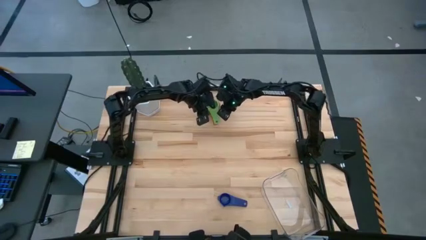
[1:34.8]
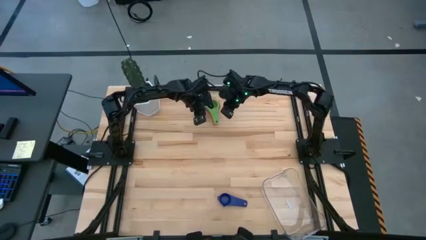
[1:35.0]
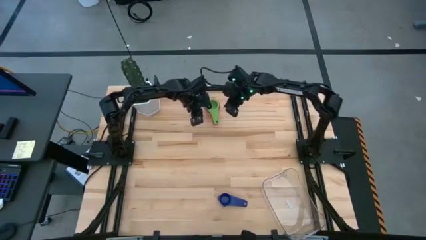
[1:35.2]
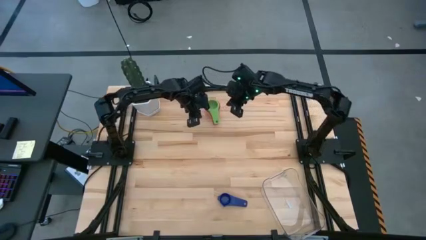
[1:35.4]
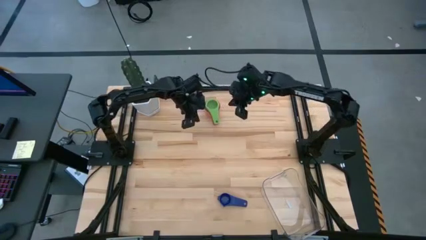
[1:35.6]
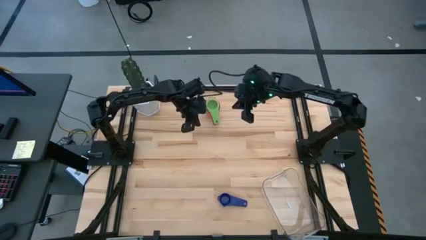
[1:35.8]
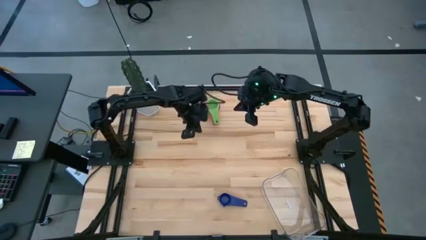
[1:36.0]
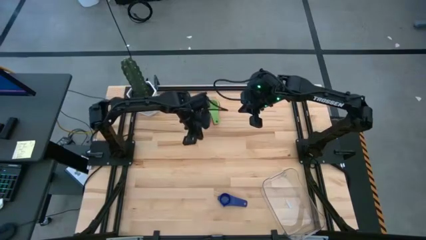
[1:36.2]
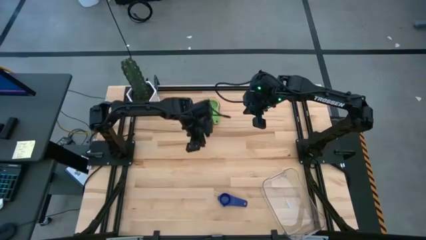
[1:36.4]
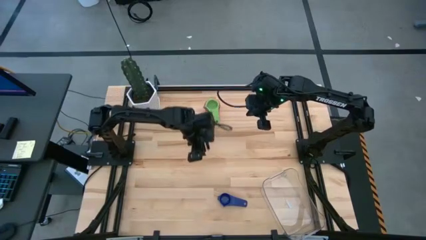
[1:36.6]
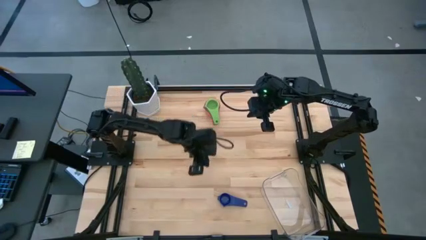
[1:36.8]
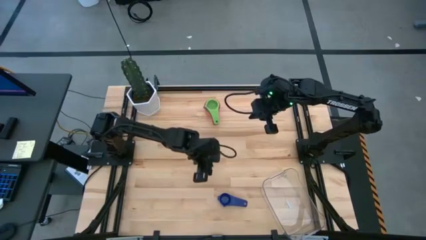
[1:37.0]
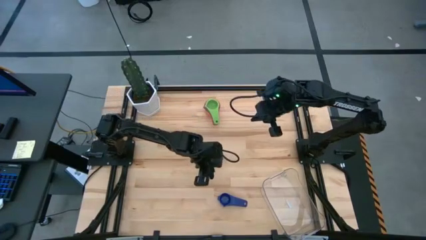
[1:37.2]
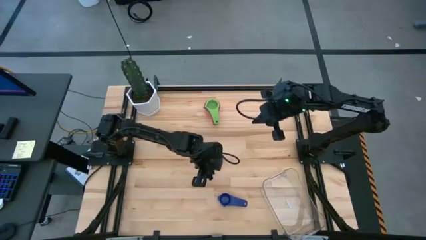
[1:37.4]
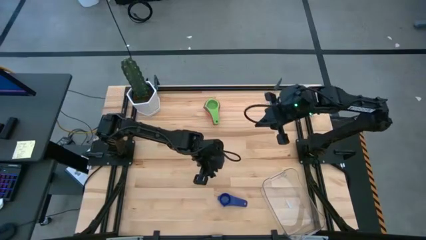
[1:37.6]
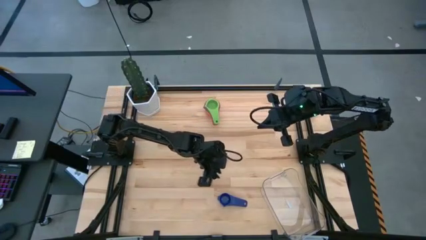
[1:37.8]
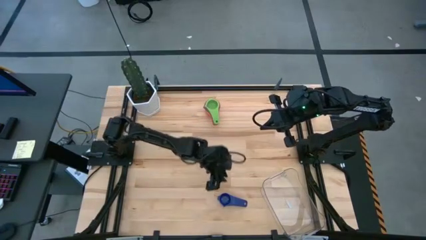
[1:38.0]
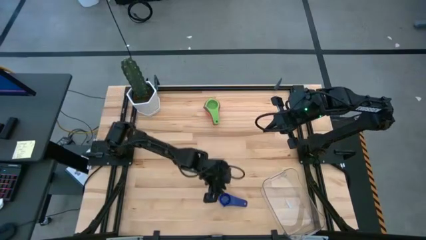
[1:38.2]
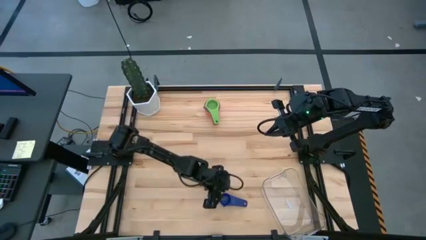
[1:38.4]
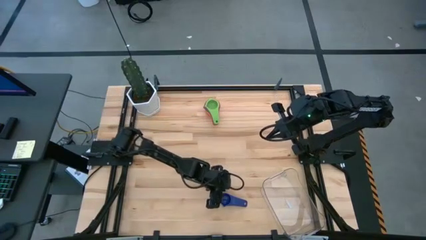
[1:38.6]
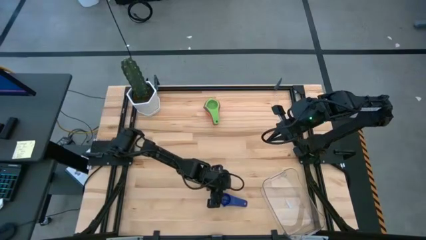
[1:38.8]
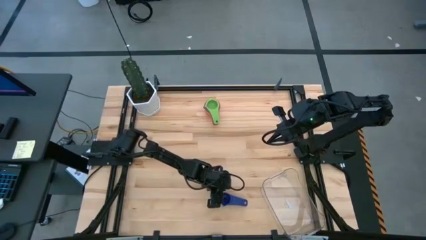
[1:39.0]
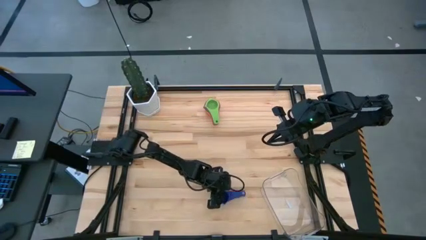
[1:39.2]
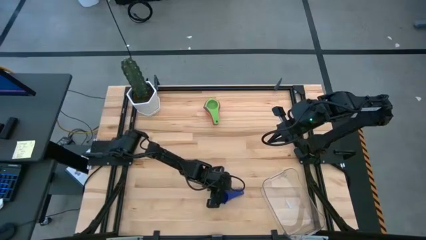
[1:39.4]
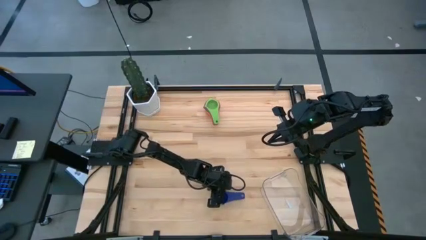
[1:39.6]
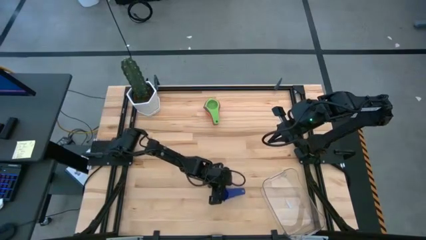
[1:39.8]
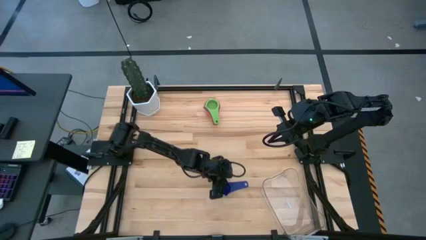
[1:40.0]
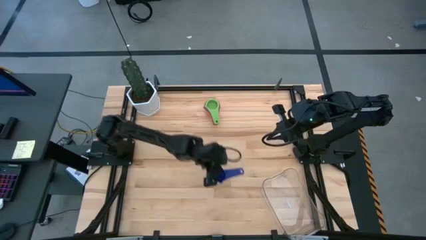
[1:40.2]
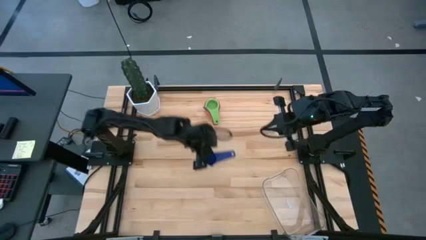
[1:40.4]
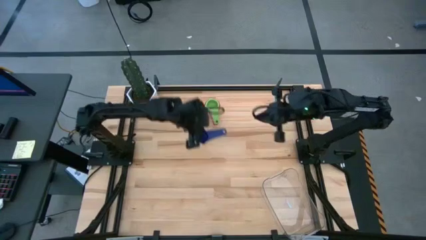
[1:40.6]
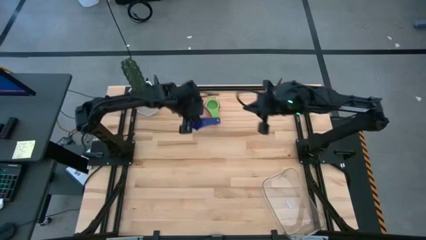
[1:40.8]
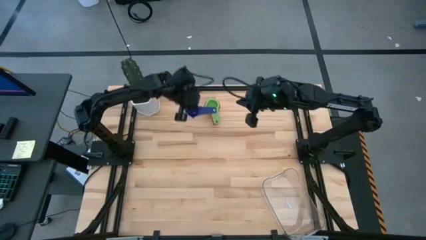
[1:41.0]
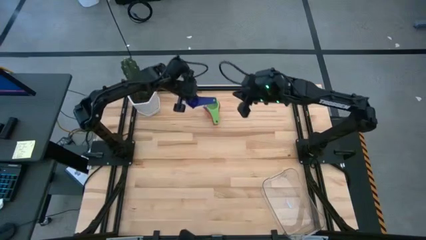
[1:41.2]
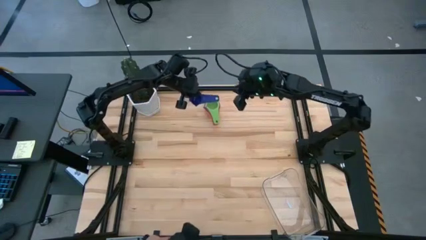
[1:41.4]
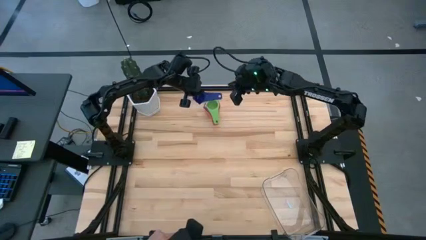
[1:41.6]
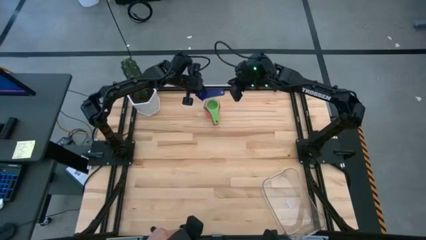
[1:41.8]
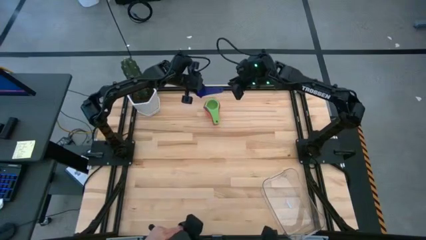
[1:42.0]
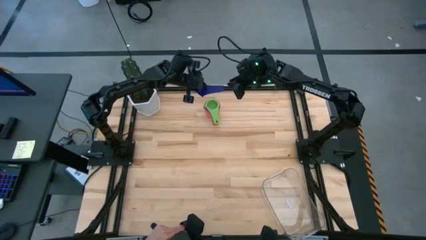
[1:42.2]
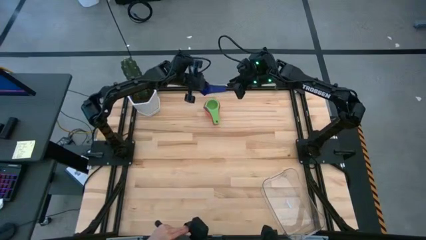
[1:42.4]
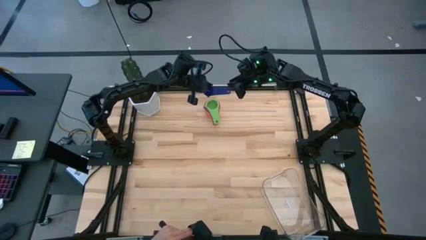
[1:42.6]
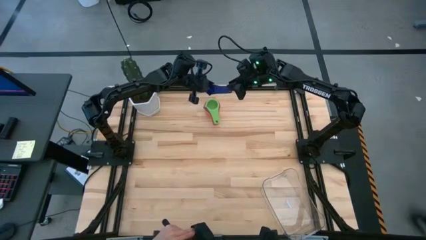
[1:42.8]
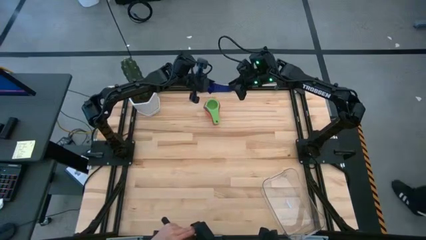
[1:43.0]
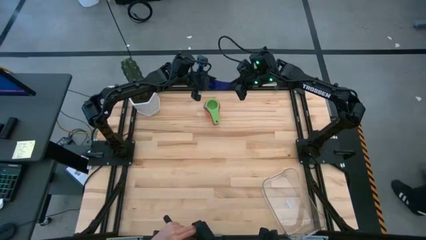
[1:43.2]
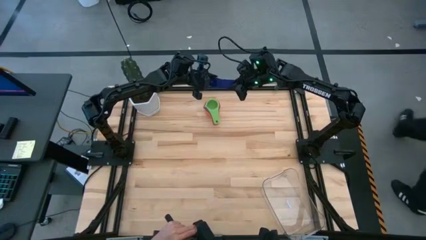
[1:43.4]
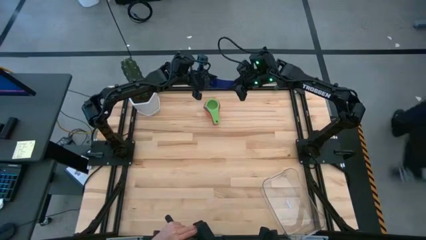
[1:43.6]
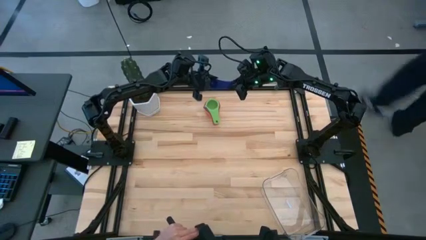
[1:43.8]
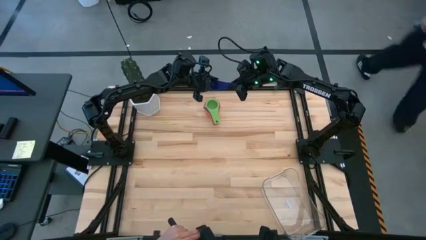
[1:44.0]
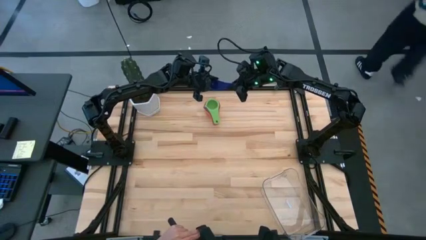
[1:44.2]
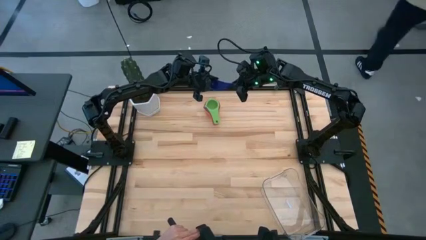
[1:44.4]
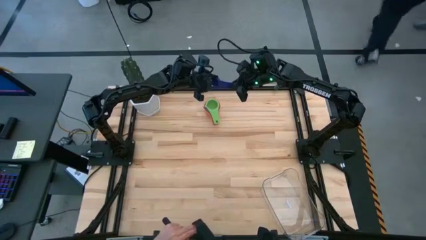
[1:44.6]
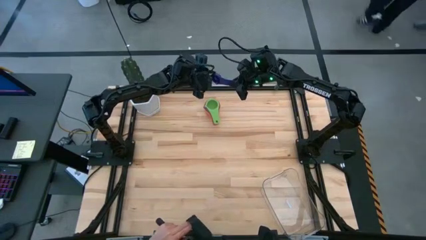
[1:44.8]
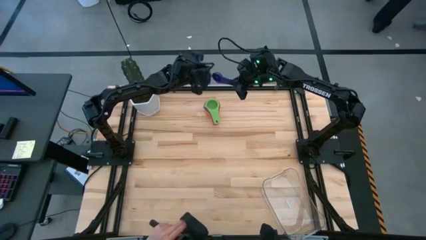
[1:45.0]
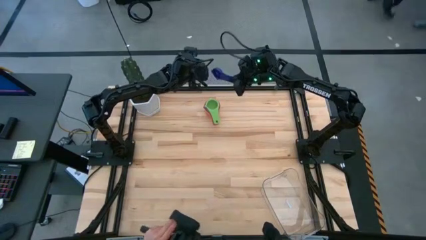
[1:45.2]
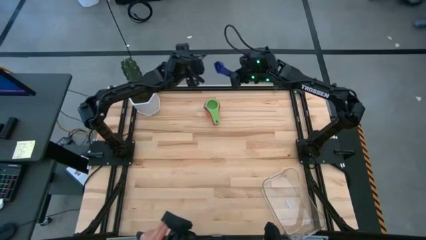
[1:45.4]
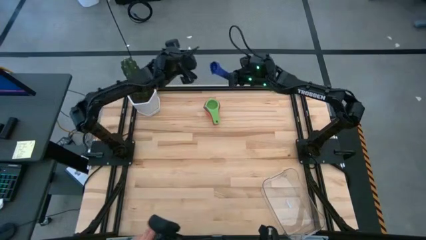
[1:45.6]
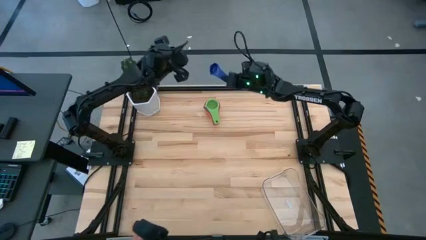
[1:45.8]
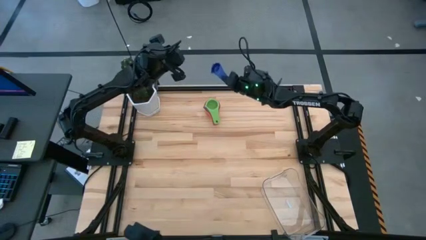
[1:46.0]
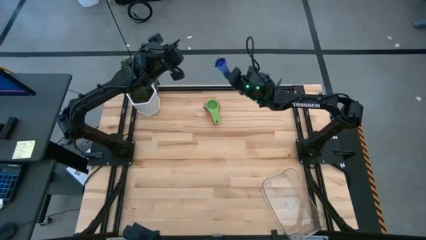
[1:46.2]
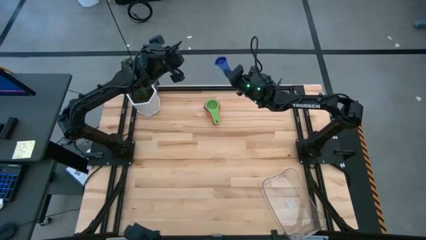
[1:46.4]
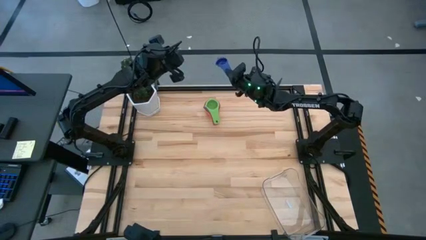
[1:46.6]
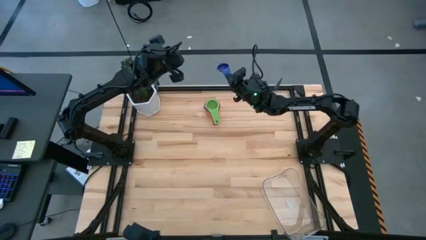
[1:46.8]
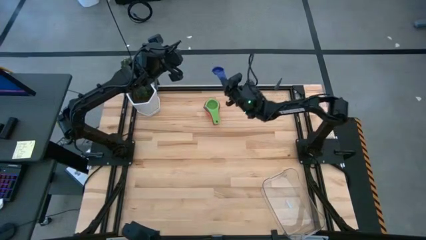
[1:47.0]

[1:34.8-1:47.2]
Task: Nest measuring cups in basket
Stack the violet measuring cup on top of the green measuring cup
